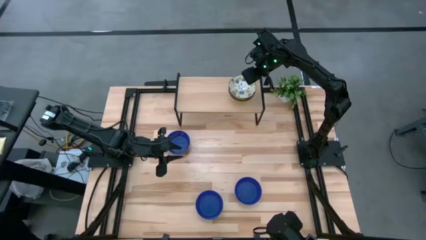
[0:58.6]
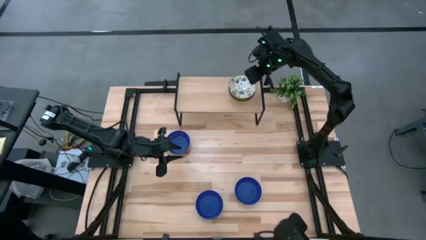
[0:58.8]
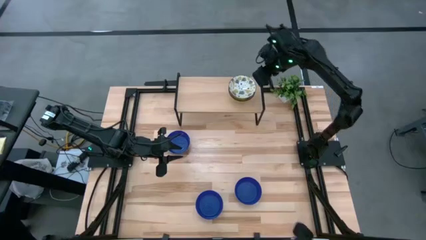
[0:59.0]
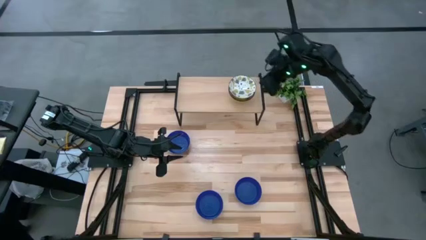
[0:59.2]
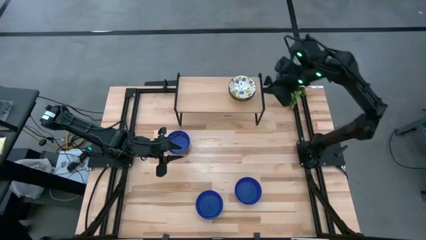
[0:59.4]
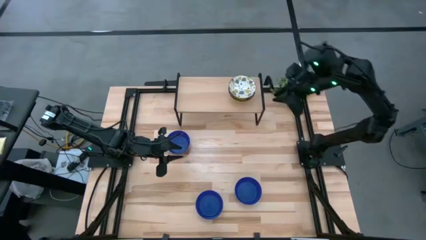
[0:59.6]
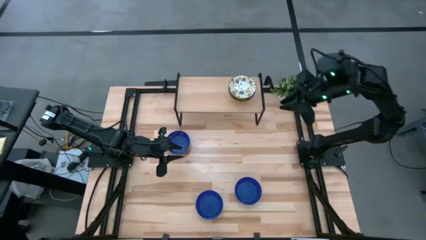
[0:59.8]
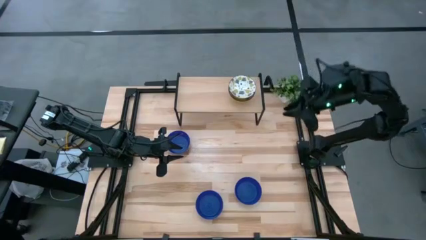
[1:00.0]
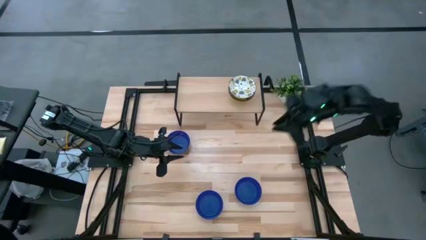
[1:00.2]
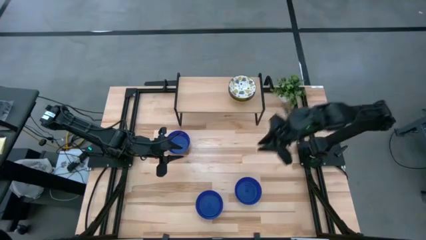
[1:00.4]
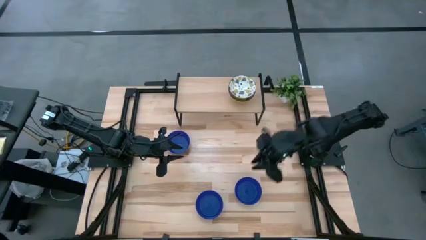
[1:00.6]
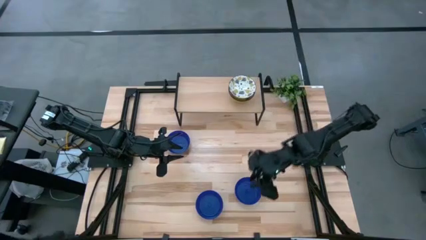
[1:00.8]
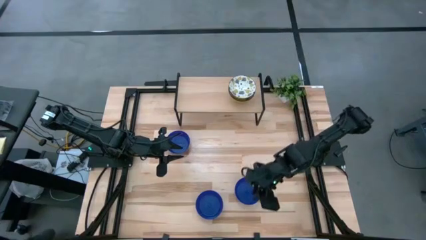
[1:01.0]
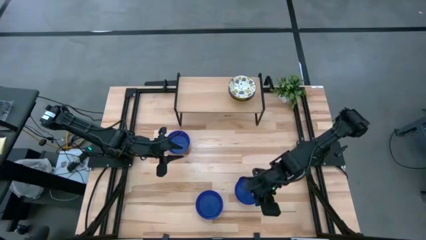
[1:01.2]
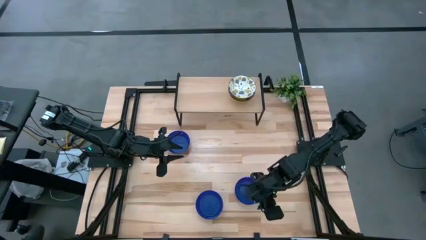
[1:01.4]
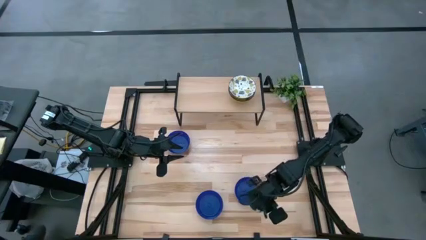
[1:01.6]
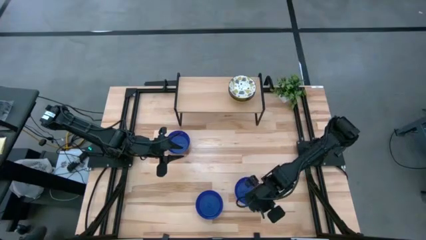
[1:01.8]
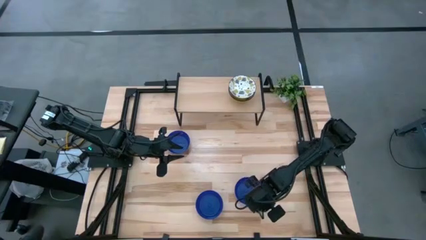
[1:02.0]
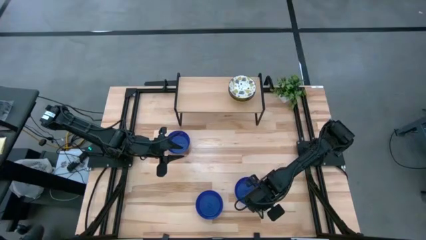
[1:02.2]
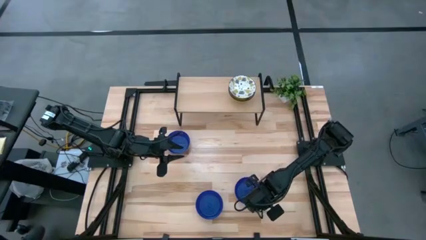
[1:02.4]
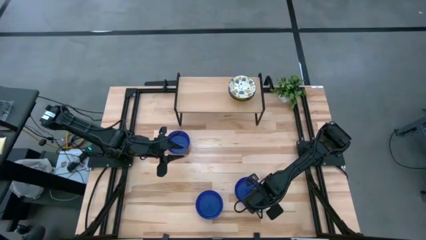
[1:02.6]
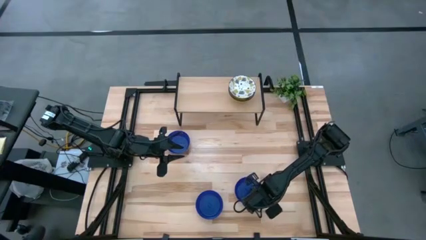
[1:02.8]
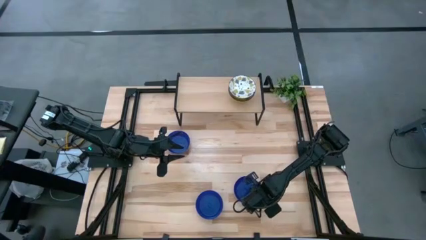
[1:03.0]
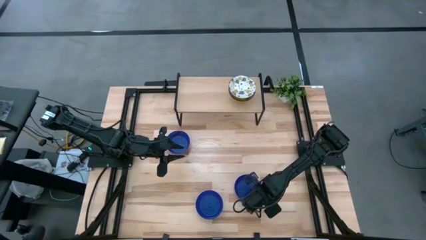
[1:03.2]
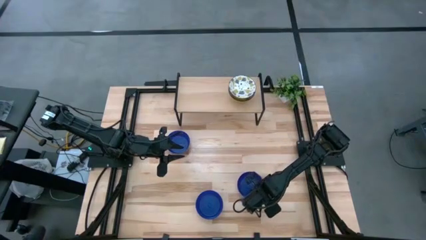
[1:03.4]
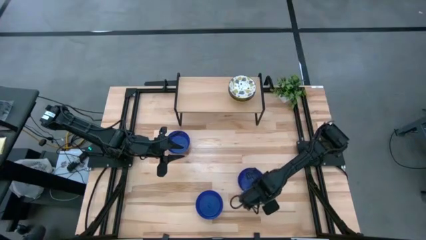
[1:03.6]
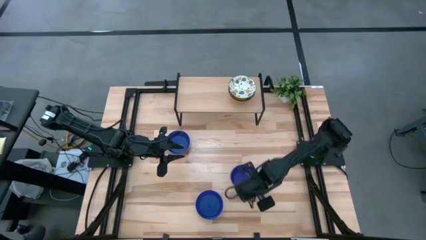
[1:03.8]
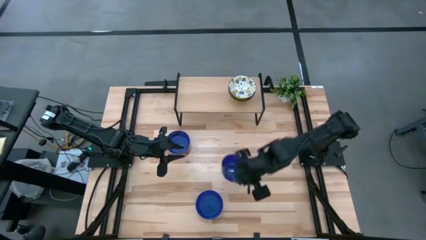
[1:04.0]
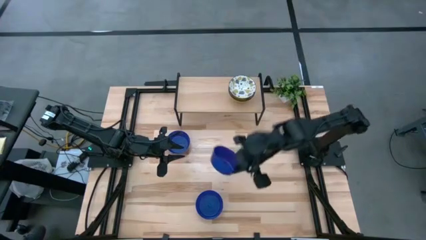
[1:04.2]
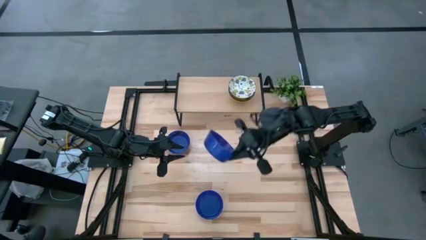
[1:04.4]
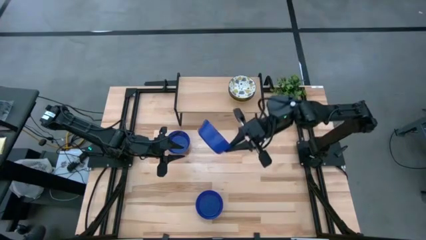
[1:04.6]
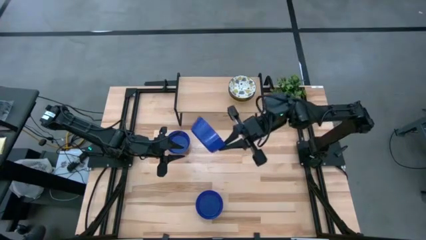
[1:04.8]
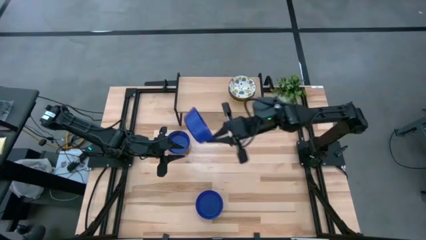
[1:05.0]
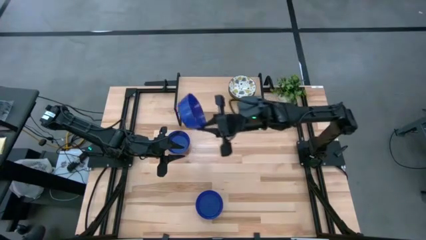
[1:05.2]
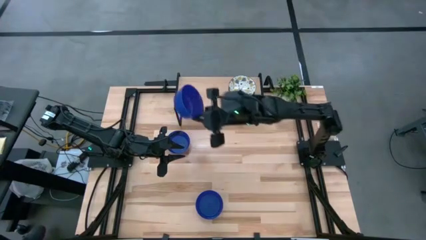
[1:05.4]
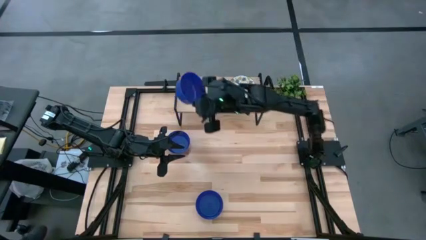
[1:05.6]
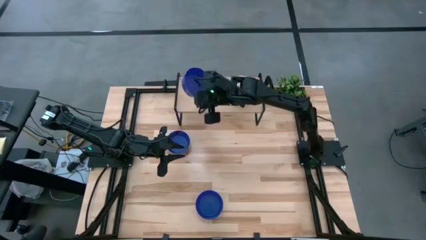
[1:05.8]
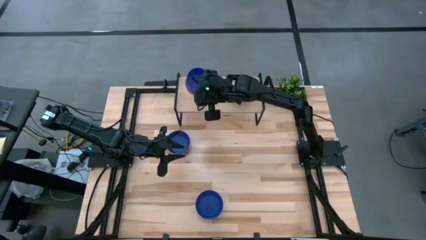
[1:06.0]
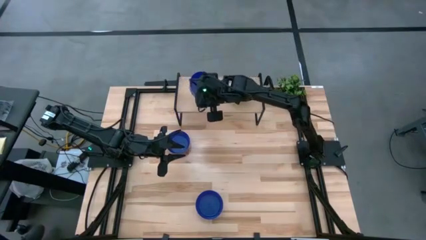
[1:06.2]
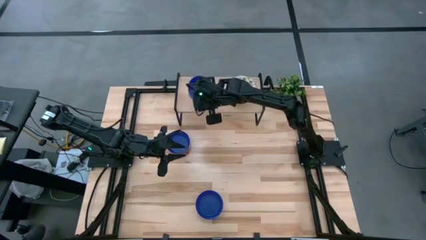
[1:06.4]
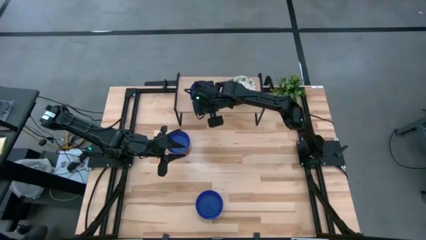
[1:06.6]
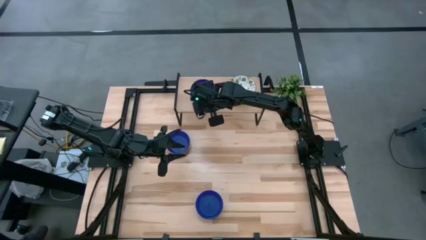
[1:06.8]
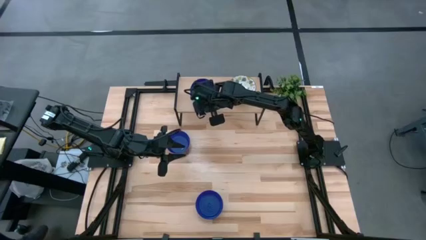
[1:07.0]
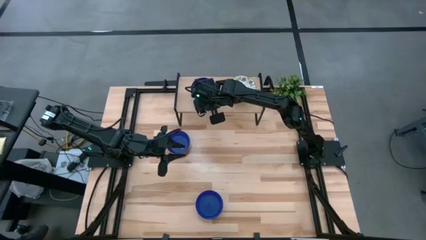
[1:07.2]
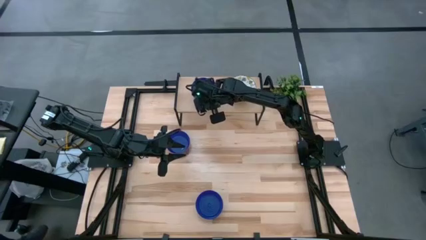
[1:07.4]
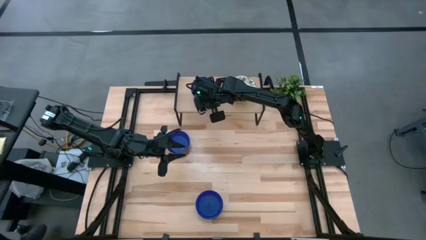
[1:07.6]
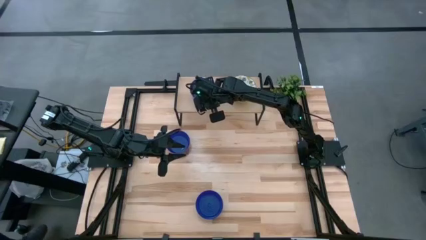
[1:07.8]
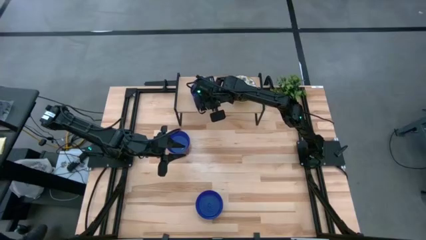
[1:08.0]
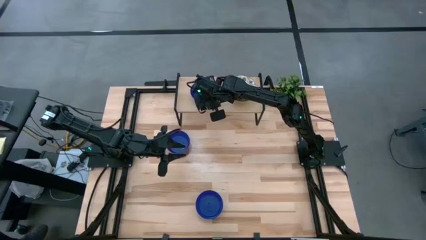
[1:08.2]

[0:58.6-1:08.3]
Task: Pick & Place Mini bowls
Put the bottom right blue bowl on the shelf

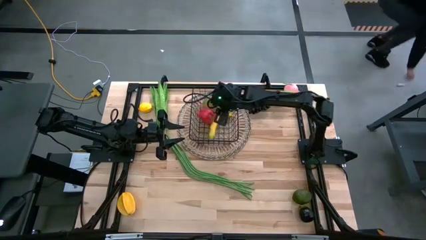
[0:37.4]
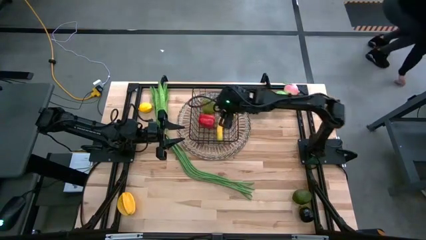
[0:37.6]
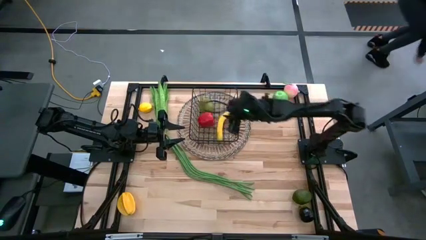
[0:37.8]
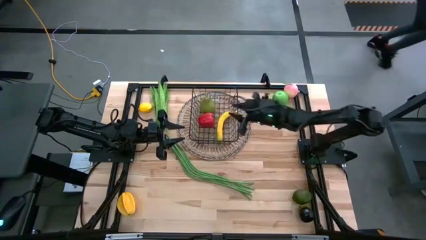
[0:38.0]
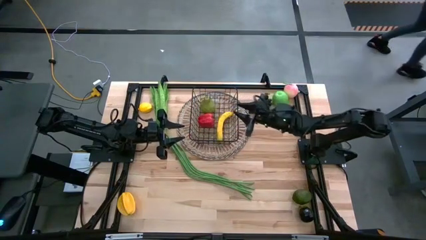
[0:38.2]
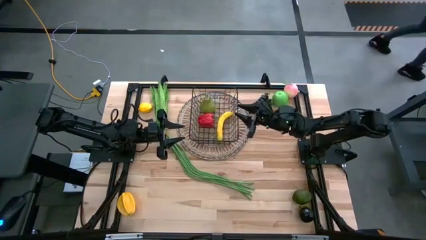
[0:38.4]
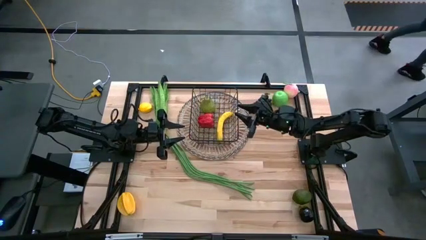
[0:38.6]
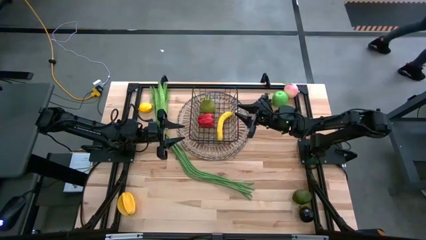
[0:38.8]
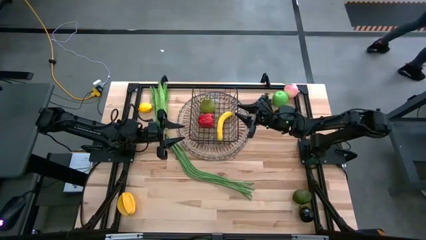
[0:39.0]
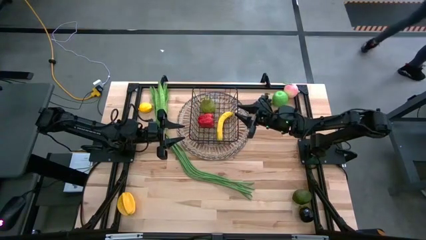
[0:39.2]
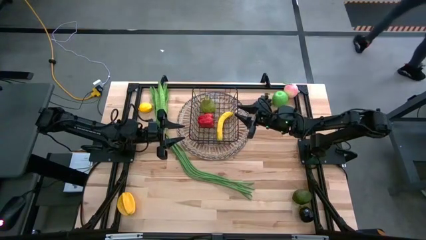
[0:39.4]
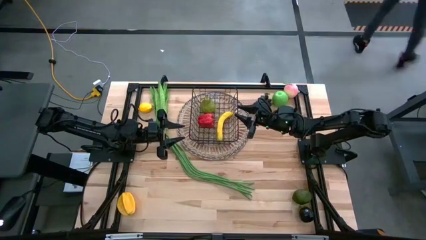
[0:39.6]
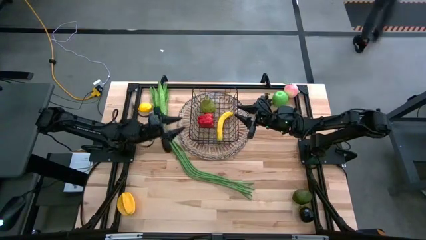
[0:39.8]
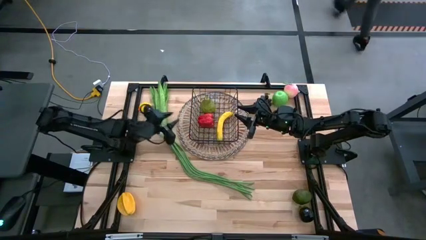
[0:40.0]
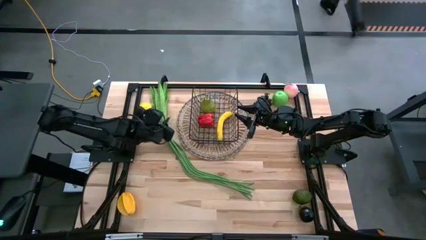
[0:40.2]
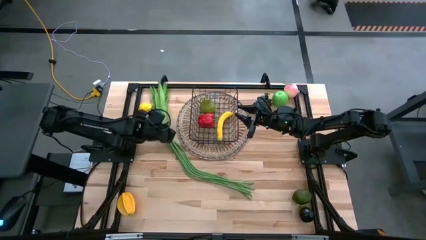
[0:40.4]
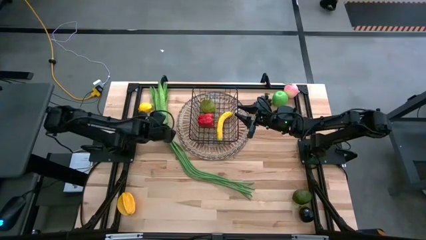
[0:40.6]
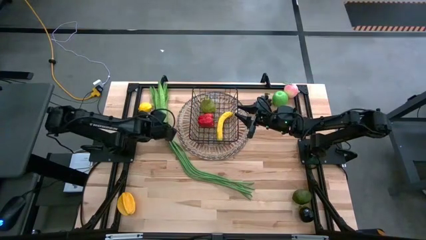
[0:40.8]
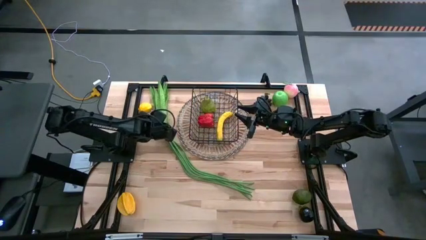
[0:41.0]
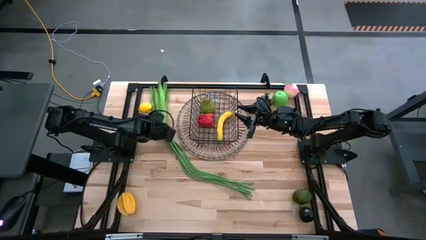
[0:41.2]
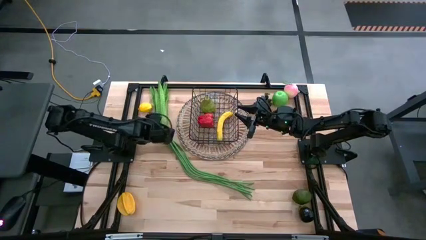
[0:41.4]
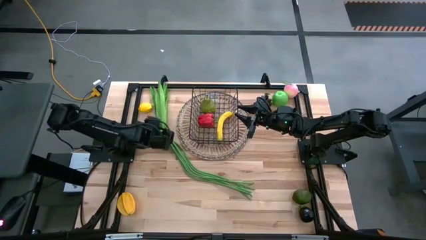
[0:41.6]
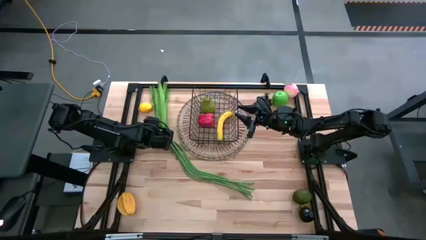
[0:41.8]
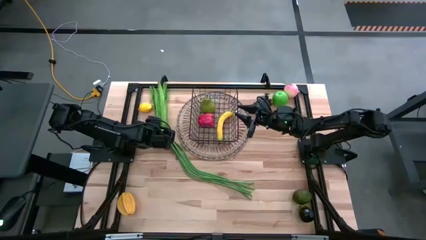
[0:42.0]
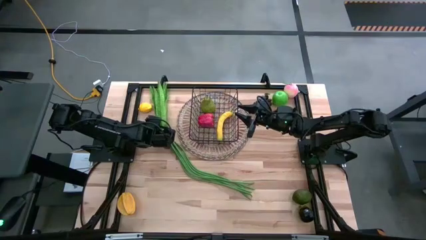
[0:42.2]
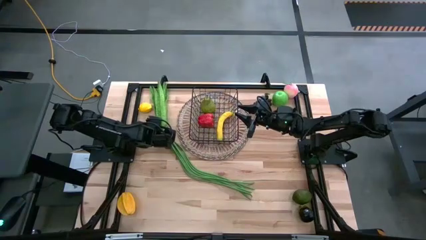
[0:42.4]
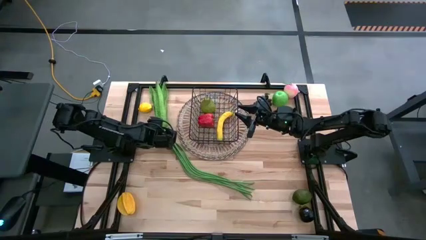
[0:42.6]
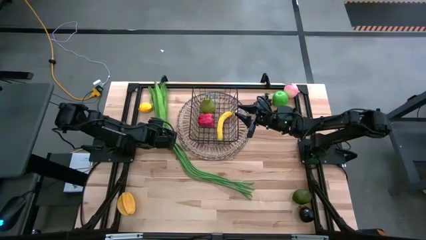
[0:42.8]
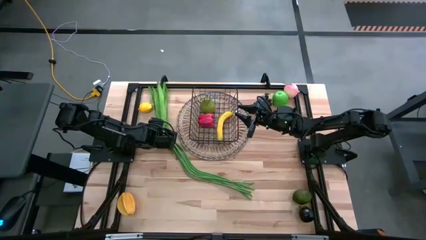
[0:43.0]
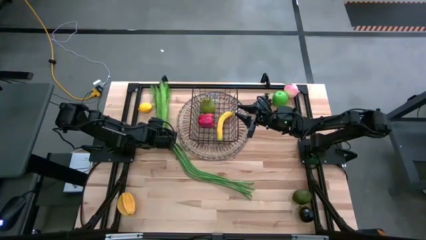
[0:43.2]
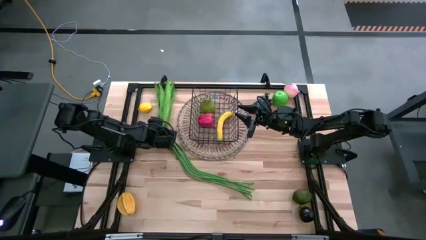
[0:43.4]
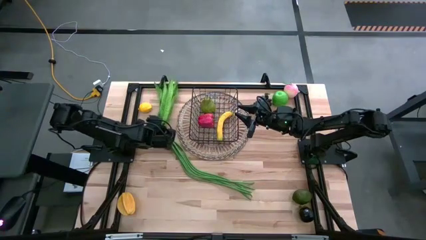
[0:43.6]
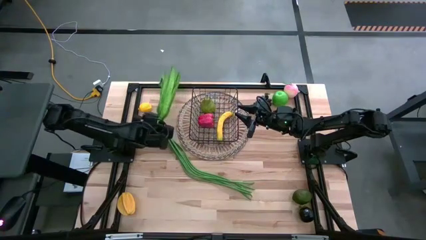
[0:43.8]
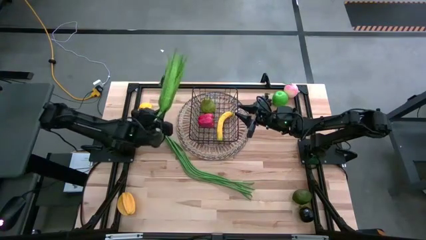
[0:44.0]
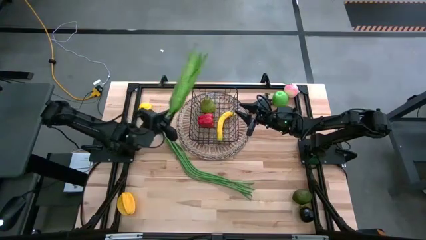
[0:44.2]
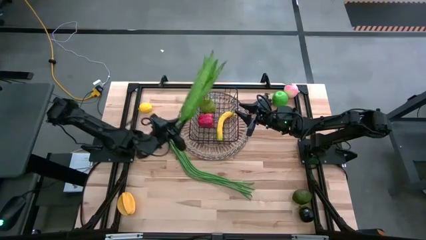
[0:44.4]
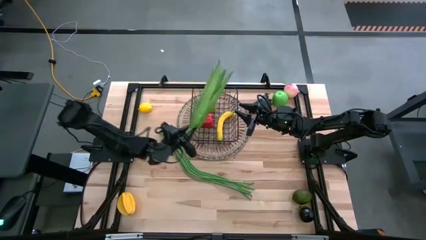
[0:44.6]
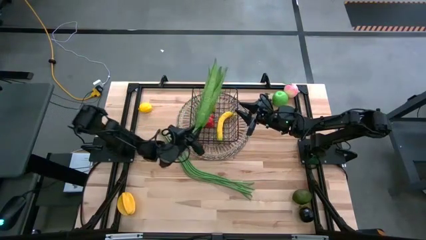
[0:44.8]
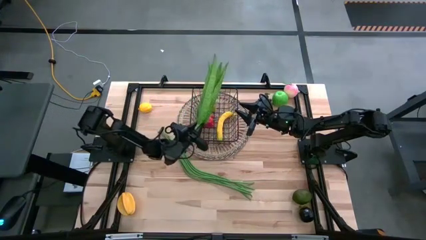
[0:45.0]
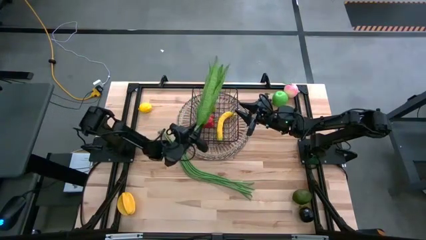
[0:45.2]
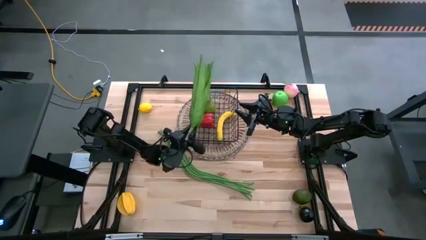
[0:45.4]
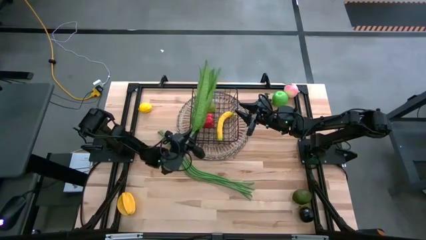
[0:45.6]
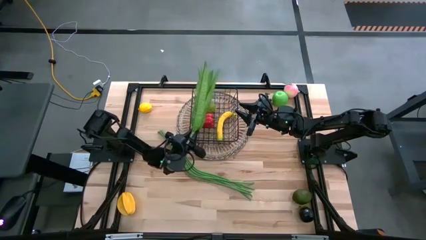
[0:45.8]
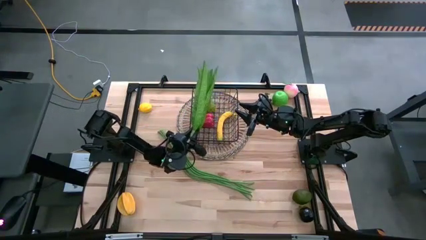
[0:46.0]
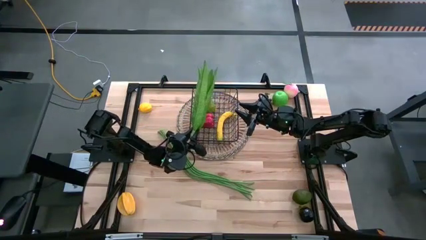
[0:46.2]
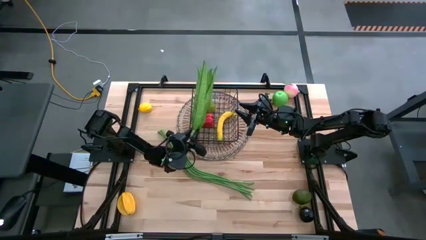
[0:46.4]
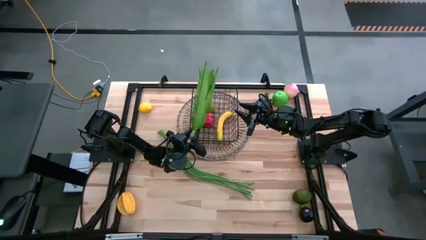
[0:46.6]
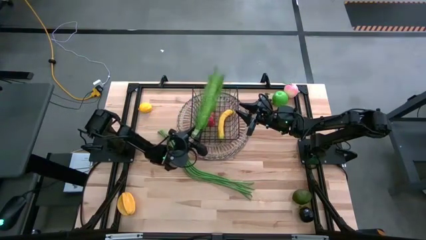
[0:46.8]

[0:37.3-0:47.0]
Task: Build produce basket
Put the green leaf lettuce into the black mesh basket
